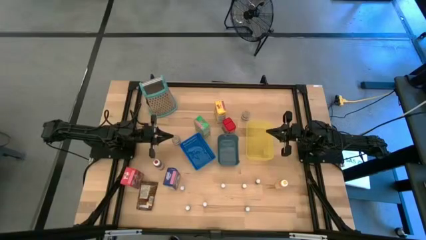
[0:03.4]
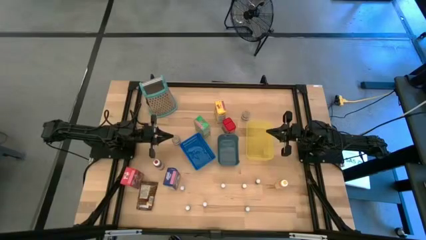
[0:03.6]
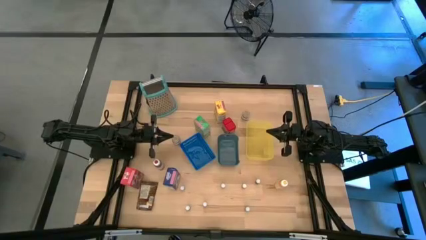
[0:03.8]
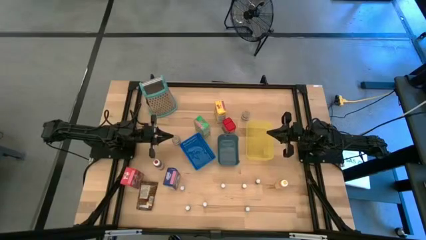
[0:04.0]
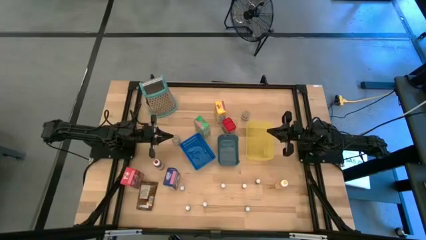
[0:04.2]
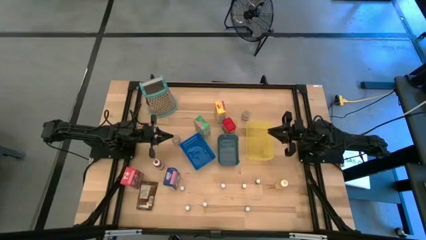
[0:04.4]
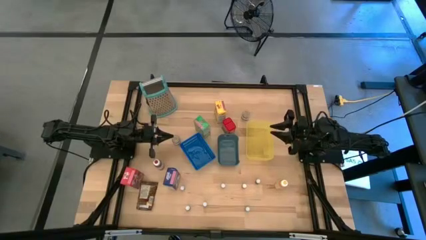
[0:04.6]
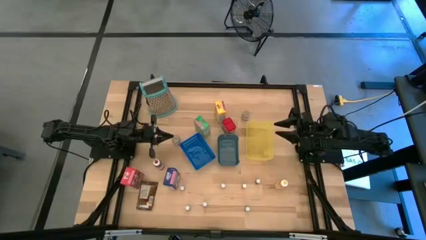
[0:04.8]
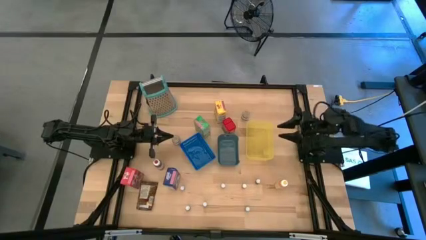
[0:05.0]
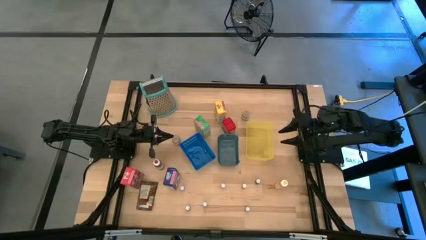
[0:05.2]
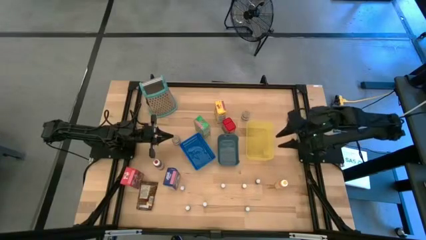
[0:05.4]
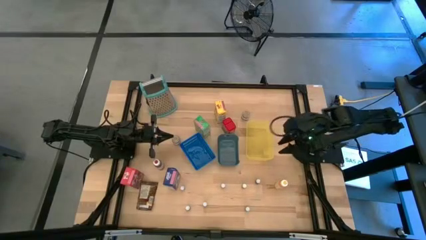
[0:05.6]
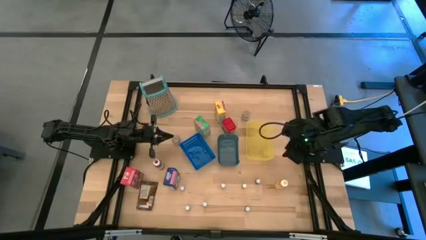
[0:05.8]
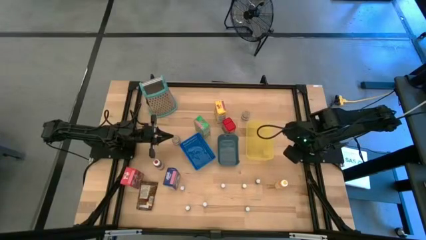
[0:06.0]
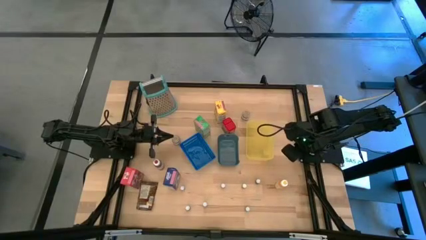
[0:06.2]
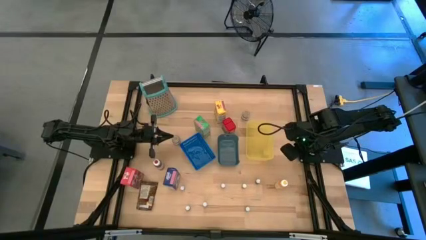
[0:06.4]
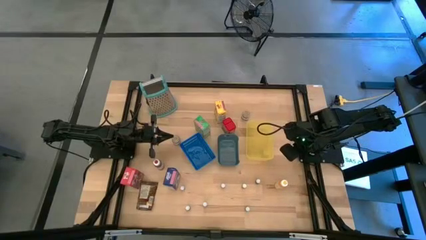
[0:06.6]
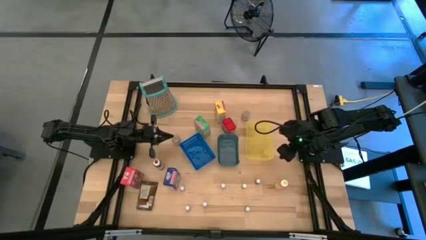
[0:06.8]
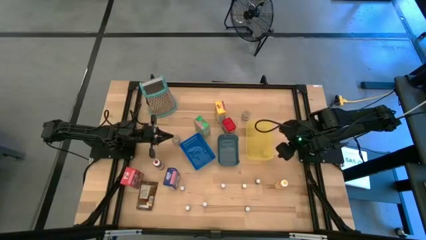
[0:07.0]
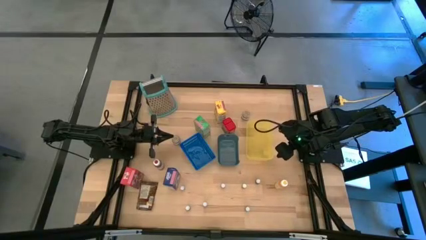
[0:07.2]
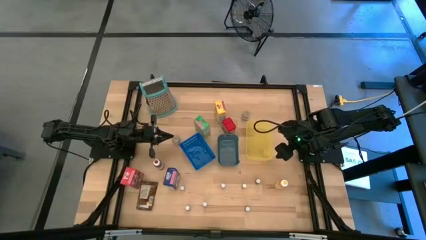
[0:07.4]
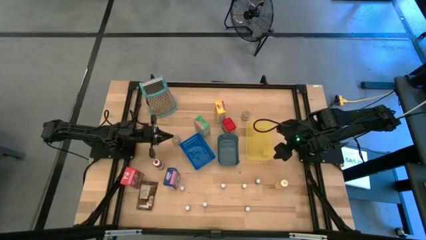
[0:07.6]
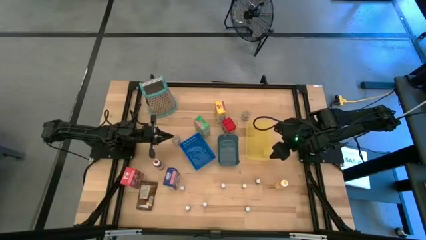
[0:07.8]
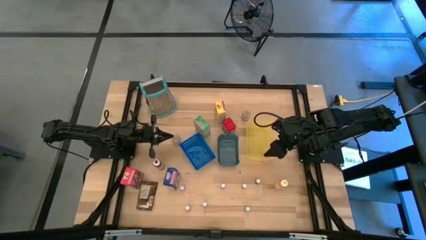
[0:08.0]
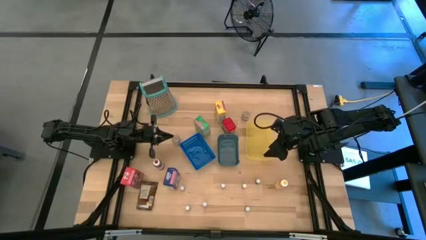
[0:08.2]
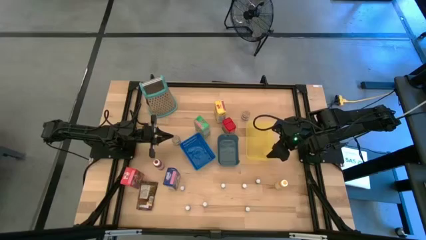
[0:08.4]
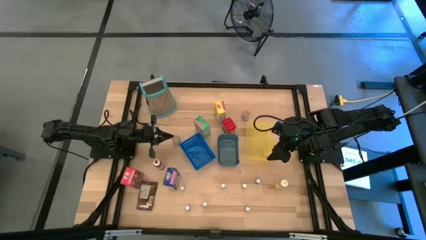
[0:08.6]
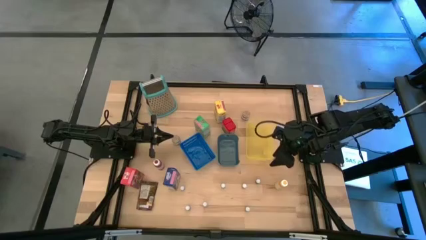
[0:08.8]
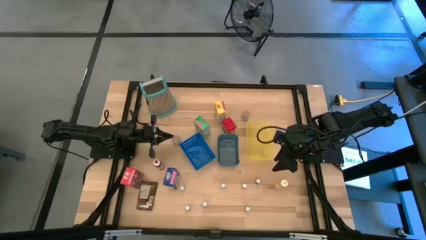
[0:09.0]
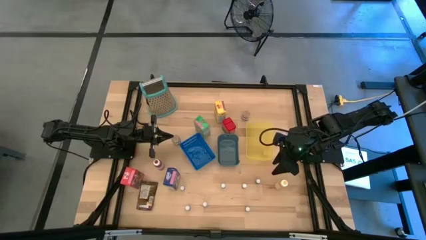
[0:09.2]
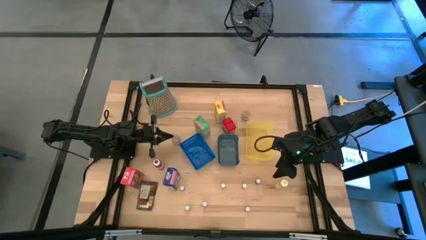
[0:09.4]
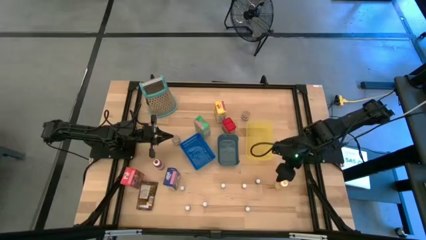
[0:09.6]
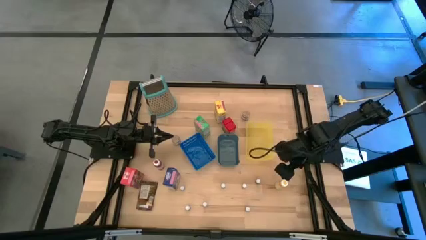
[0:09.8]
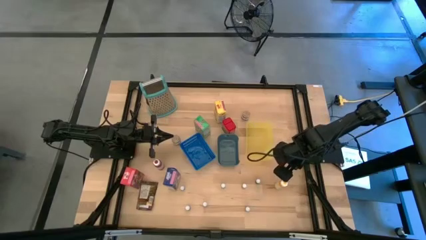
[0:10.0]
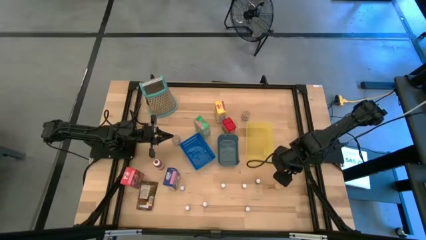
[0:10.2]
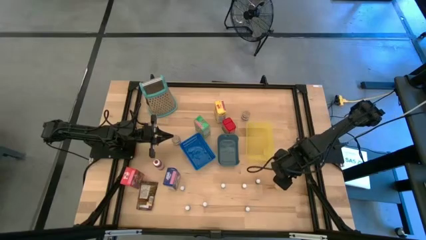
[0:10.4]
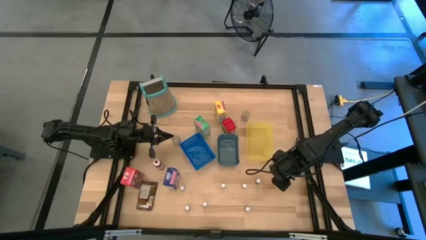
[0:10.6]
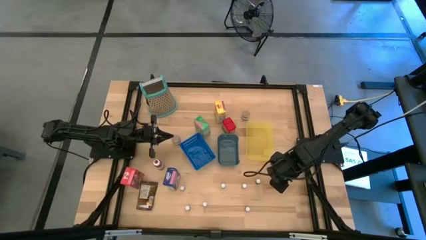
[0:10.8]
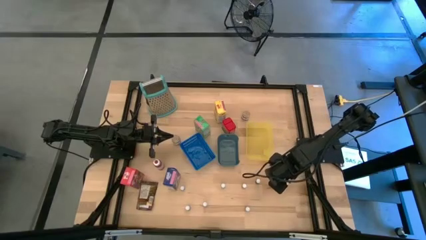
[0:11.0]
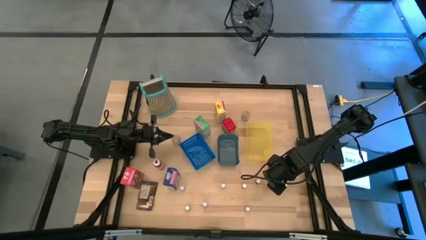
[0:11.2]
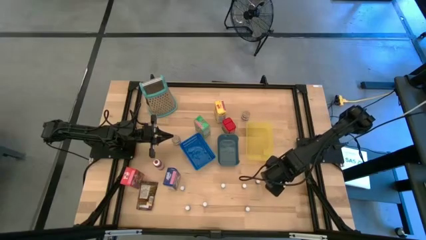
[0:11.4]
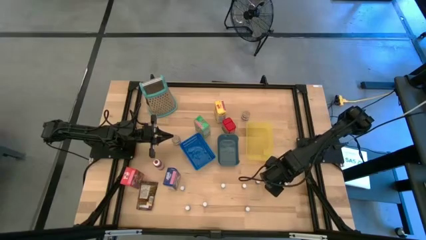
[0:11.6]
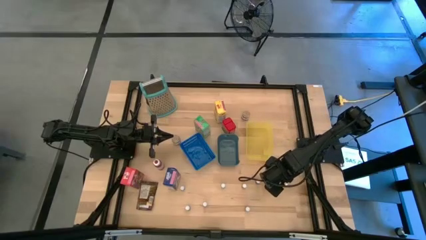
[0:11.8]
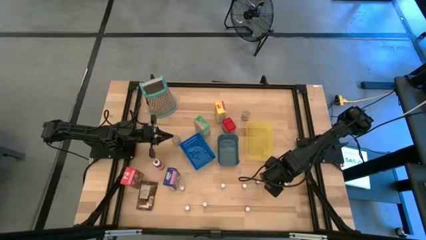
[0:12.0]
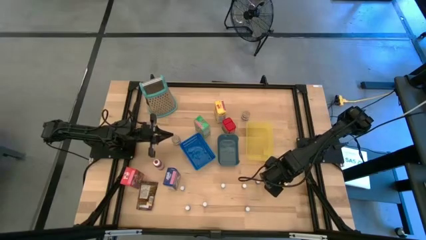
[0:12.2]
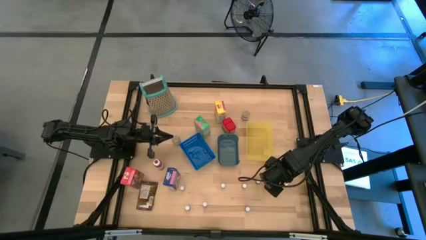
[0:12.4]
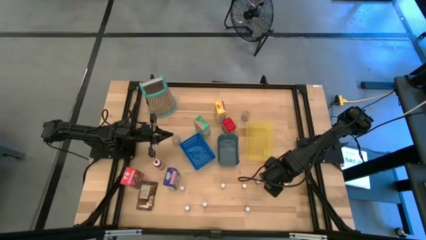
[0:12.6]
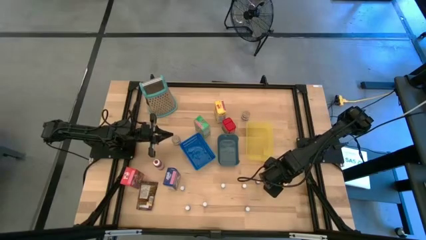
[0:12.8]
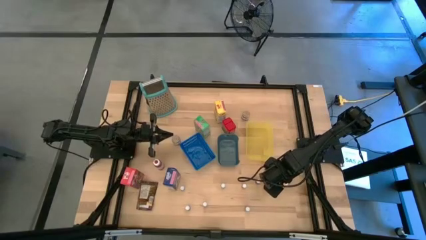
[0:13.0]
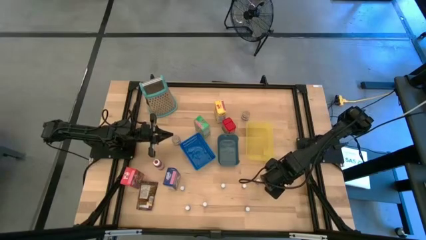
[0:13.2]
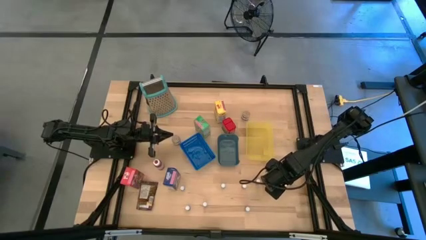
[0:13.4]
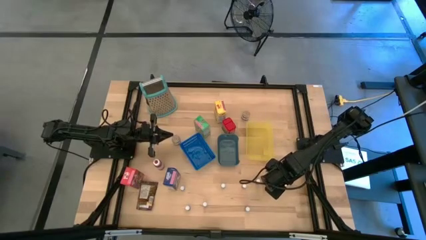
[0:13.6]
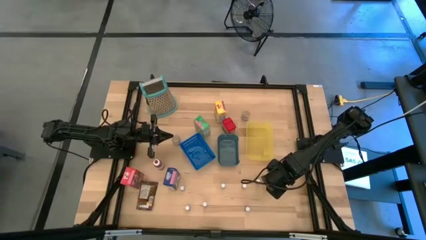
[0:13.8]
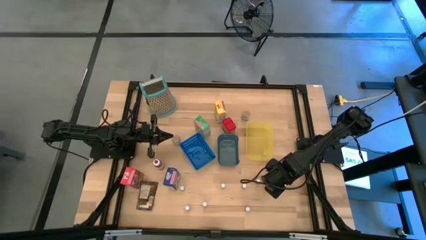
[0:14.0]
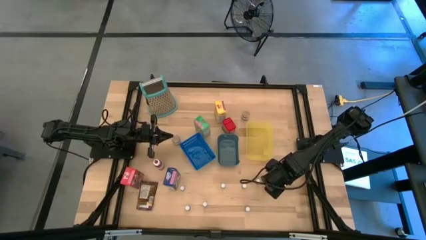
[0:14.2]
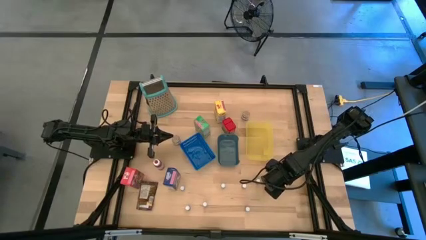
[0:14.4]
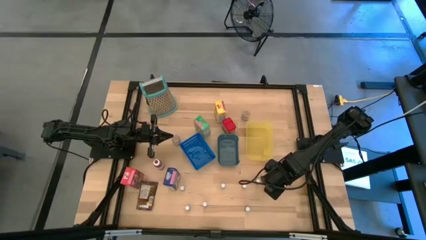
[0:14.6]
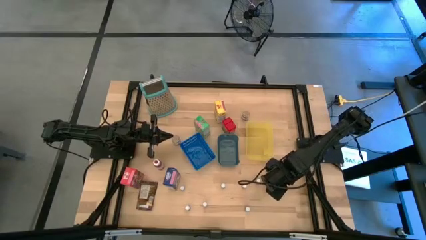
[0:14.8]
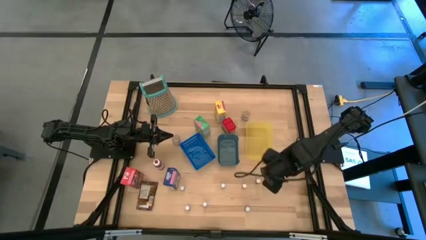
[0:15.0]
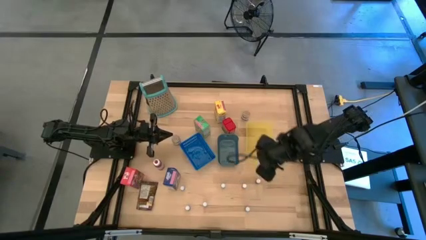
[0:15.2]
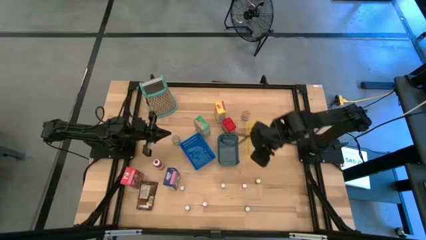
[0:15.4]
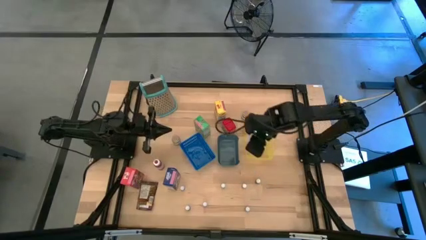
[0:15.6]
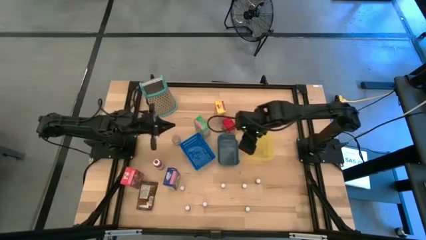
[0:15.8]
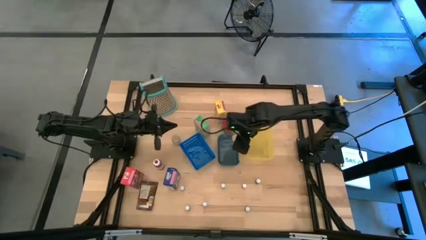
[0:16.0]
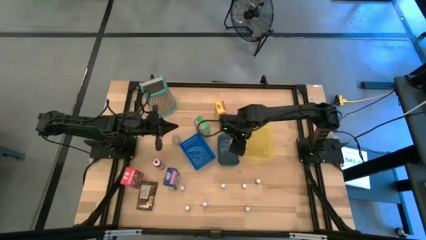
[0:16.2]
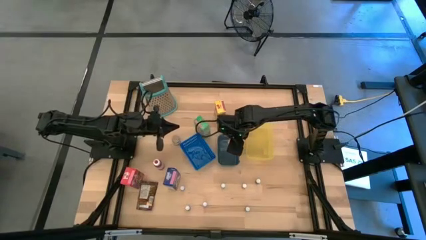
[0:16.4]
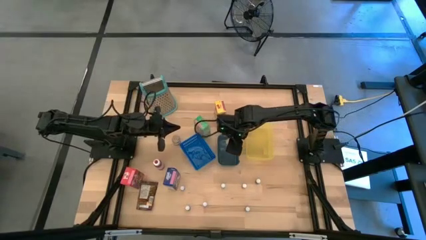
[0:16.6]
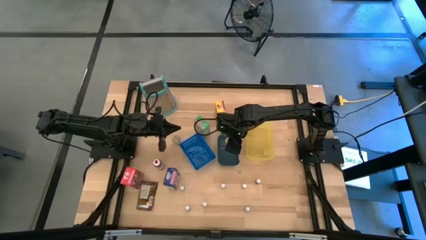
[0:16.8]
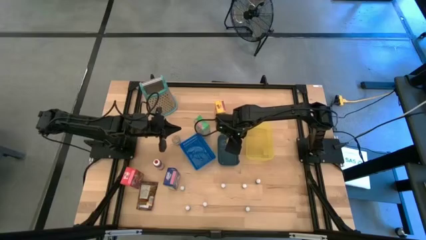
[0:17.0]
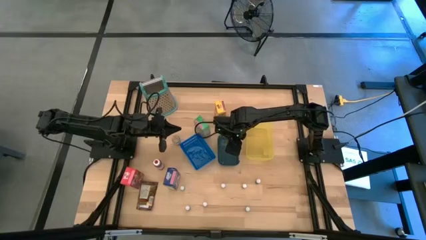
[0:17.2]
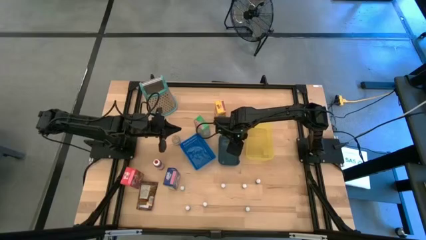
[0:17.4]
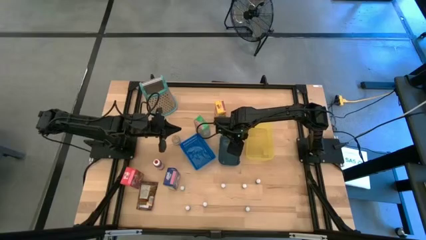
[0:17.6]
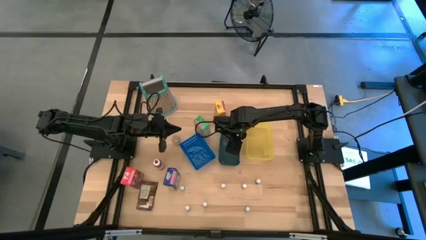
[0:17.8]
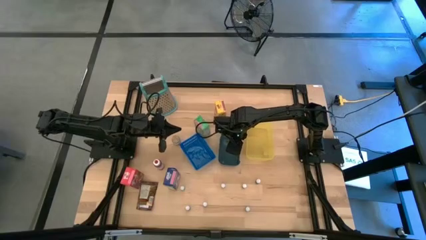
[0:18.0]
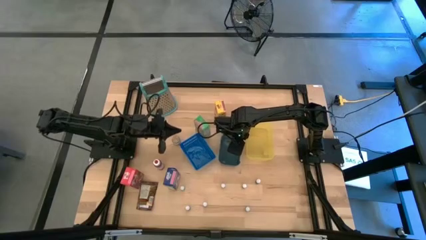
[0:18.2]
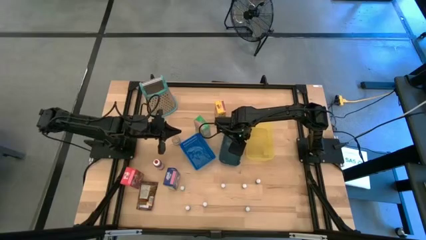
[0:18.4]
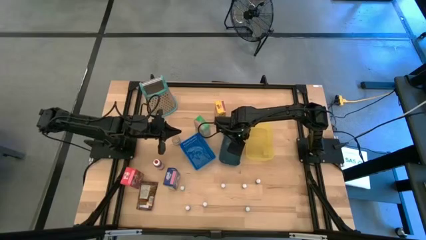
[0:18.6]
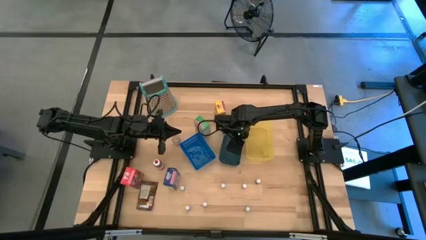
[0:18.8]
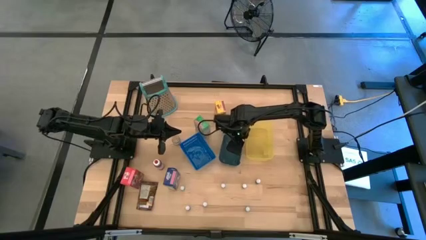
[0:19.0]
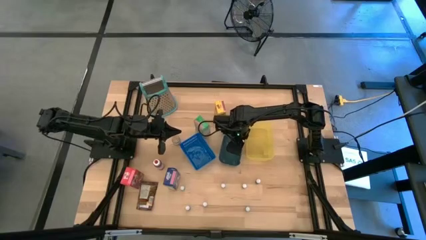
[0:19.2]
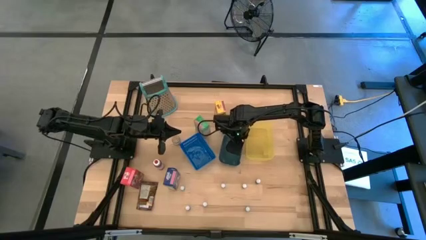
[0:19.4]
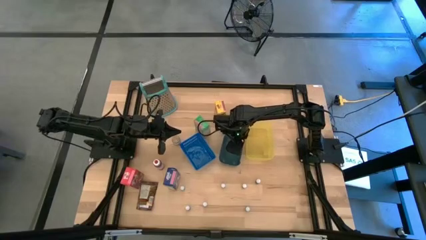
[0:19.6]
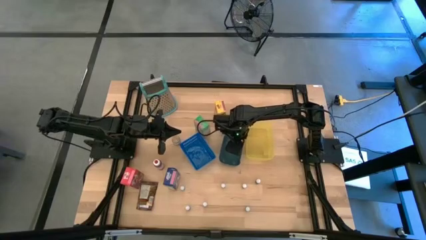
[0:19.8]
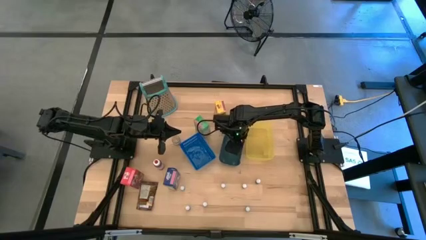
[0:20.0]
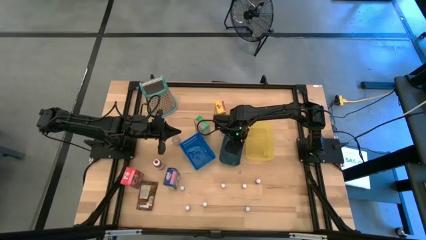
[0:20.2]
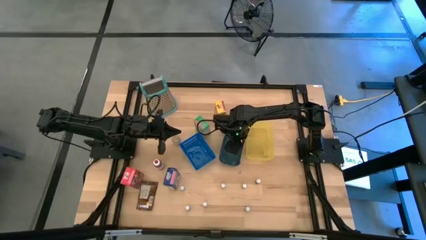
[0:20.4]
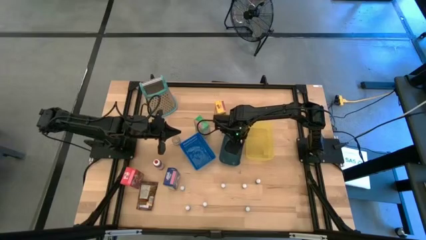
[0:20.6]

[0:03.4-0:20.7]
Task: Pick & Place Kitchen Items
Put the yellow food coloring bottle into the green bin
